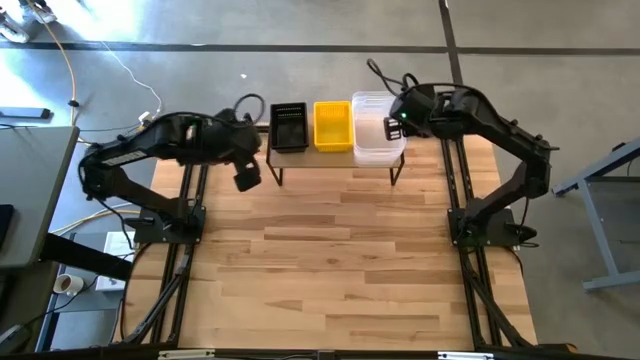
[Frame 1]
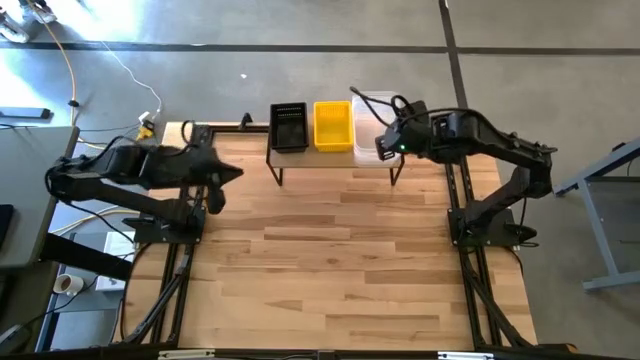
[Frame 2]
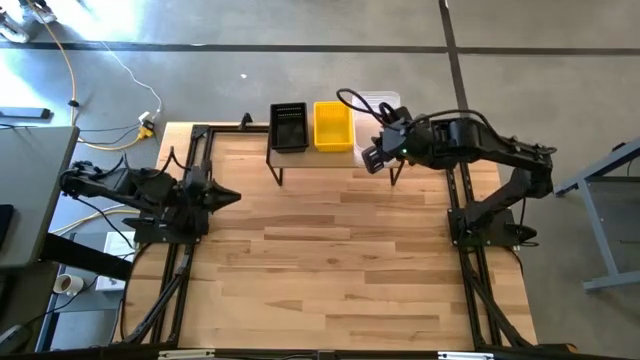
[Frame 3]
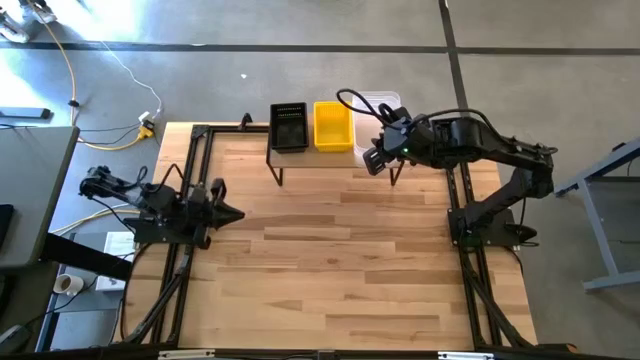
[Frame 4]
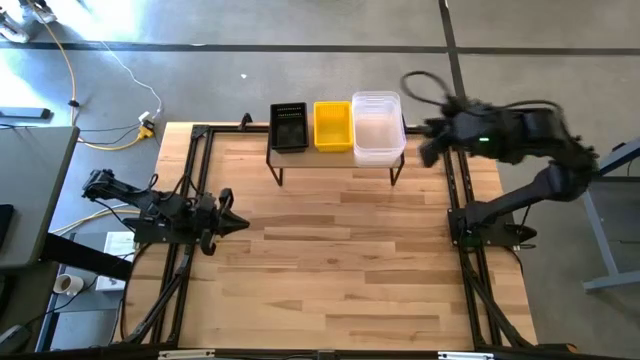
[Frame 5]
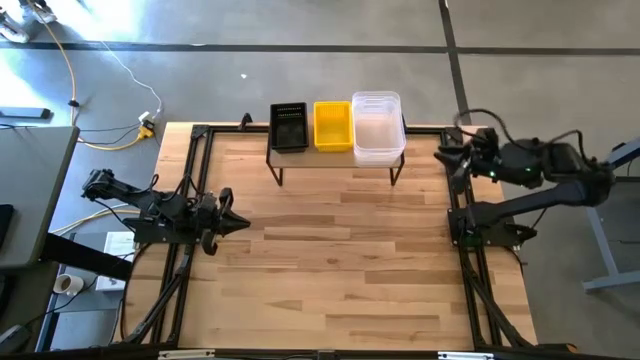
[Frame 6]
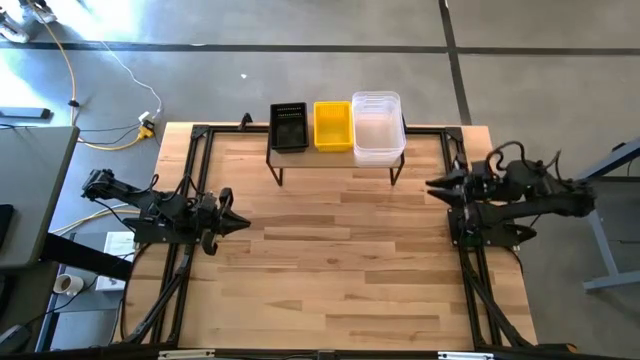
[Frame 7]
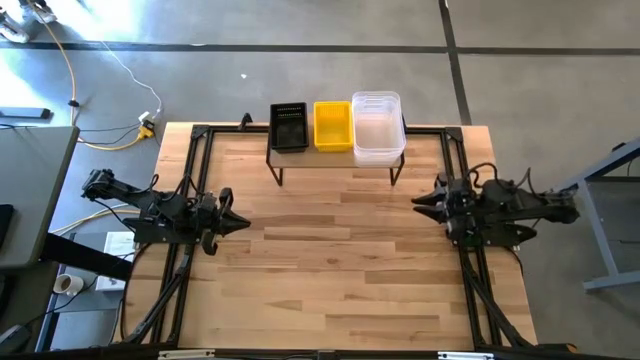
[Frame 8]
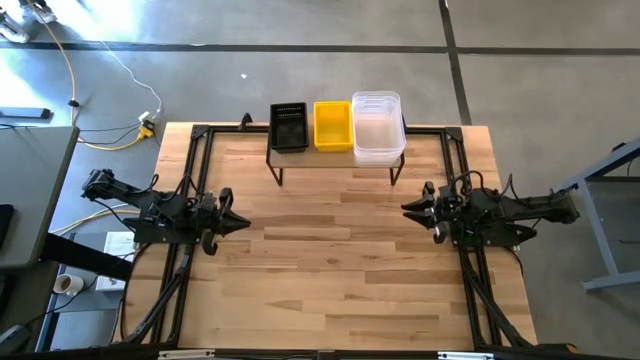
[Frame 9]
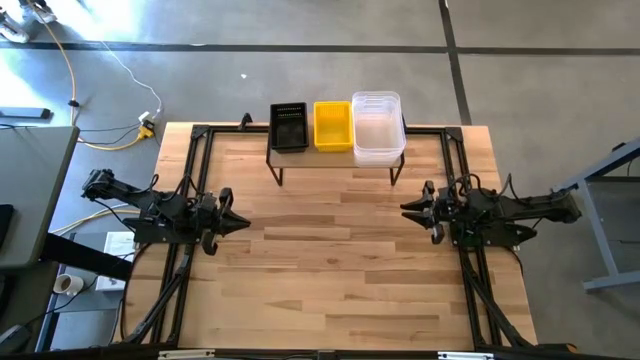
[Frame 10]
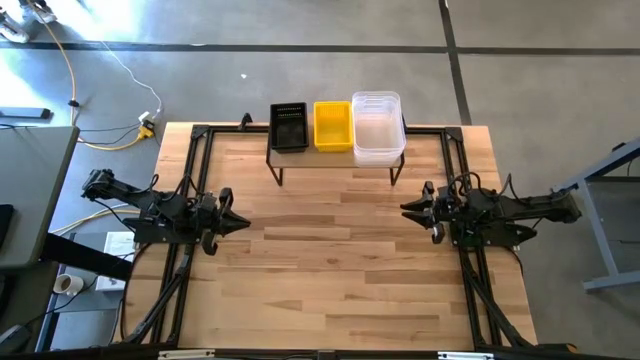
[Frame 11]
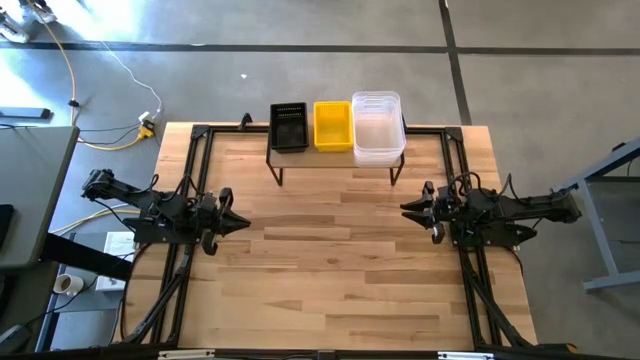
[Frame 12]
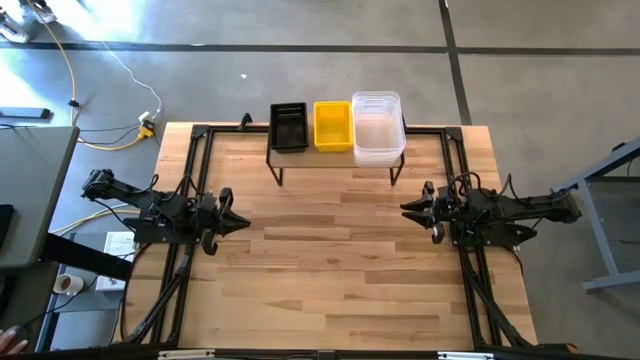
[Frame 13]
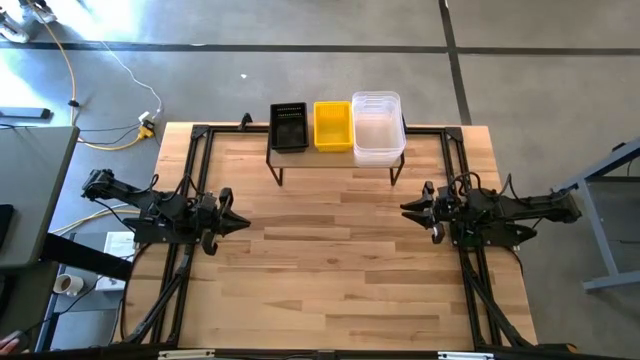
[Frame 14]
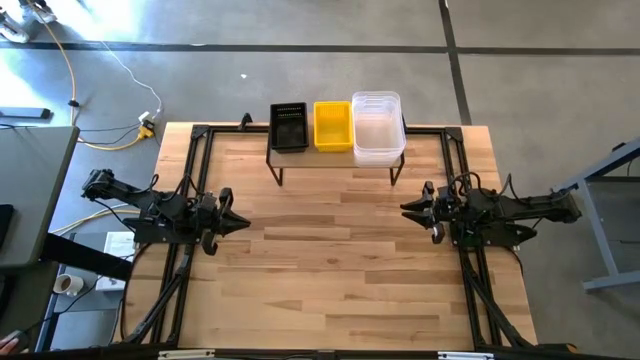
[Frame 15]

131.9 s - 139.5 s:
Task: Stack baskets on shelf by color
Return to Home Position

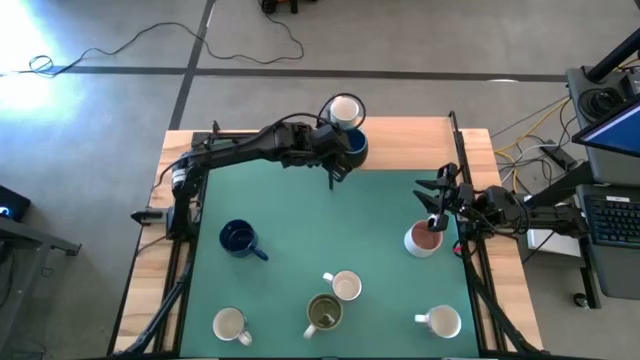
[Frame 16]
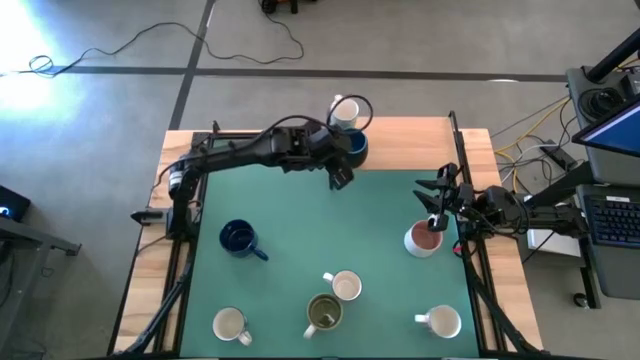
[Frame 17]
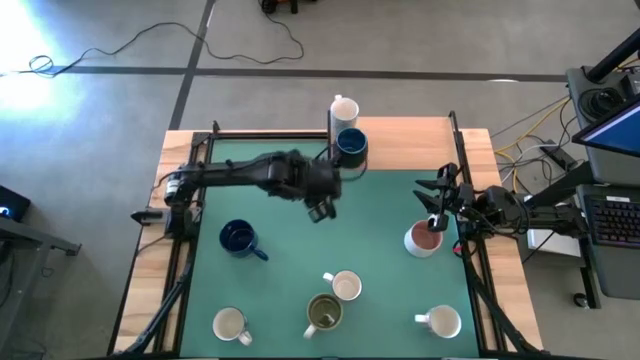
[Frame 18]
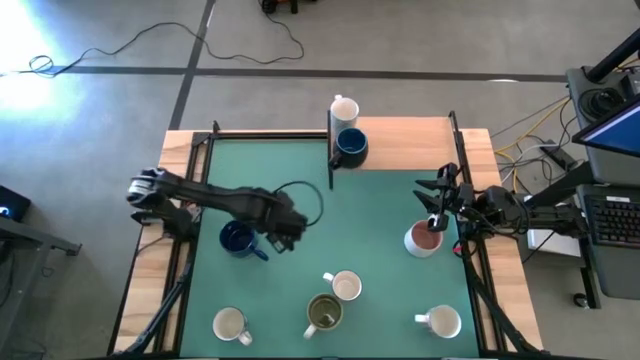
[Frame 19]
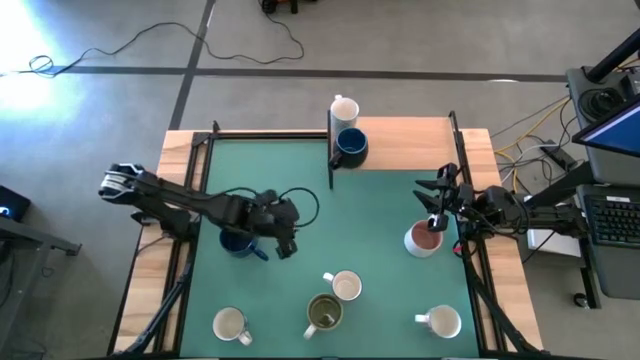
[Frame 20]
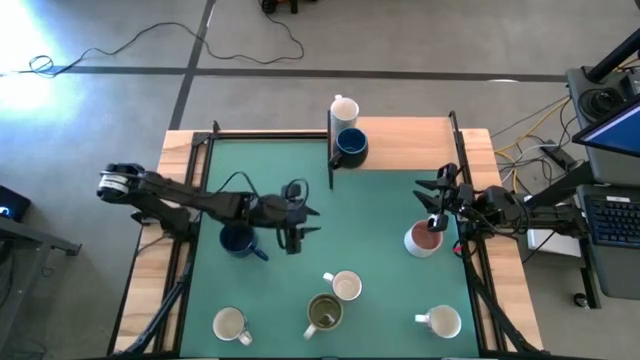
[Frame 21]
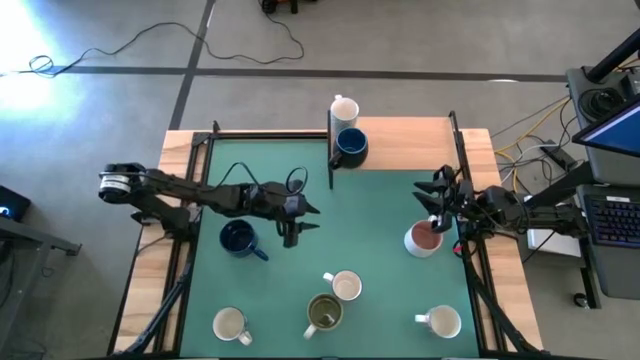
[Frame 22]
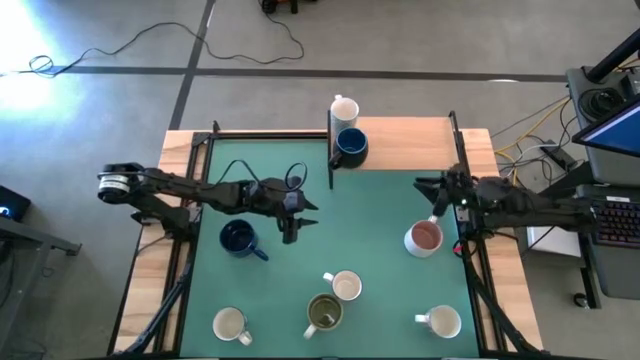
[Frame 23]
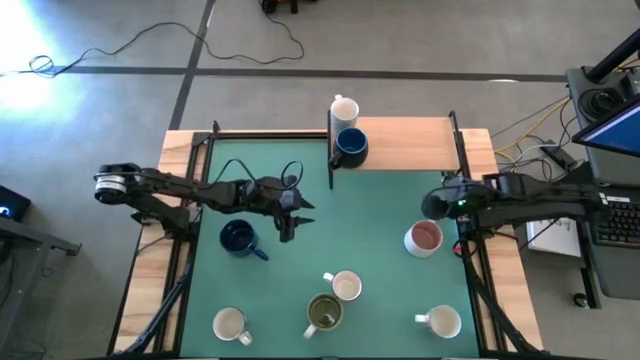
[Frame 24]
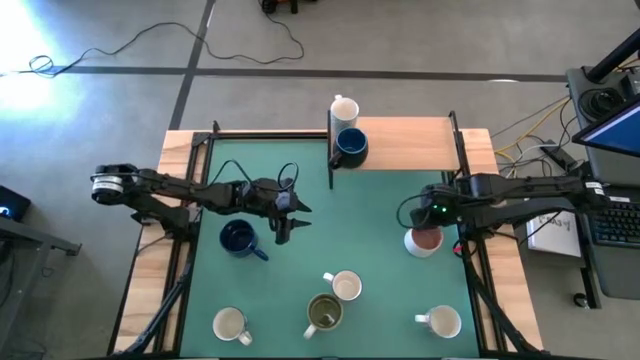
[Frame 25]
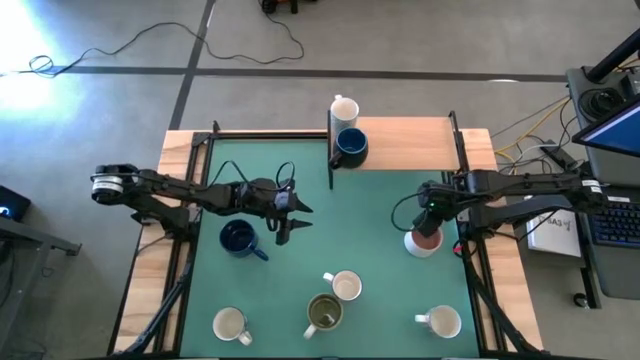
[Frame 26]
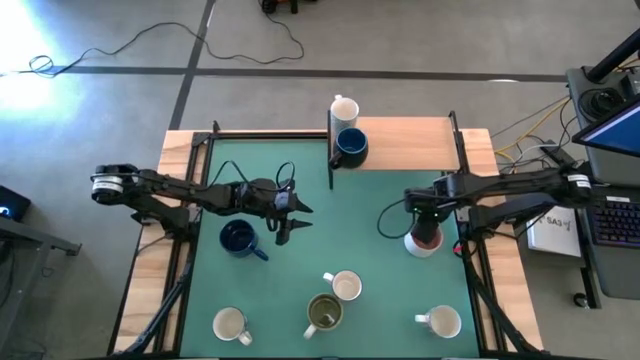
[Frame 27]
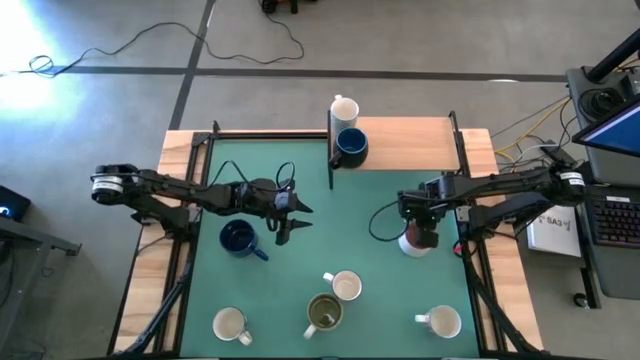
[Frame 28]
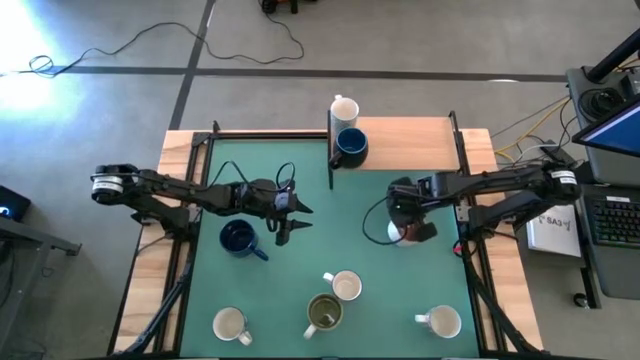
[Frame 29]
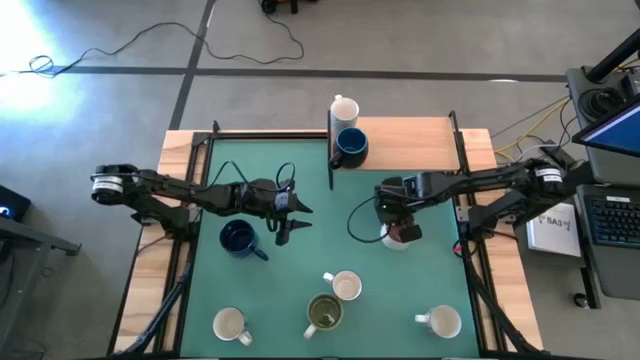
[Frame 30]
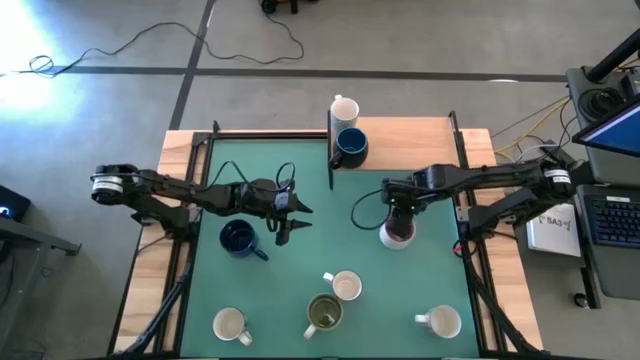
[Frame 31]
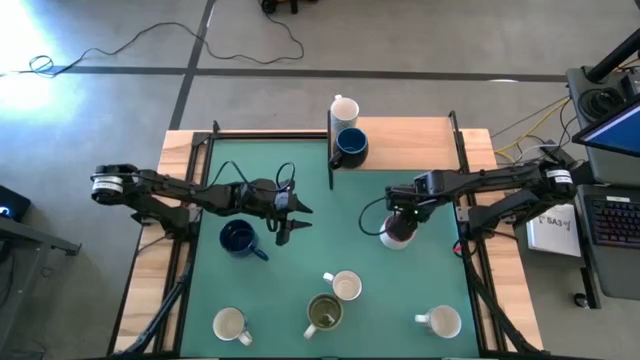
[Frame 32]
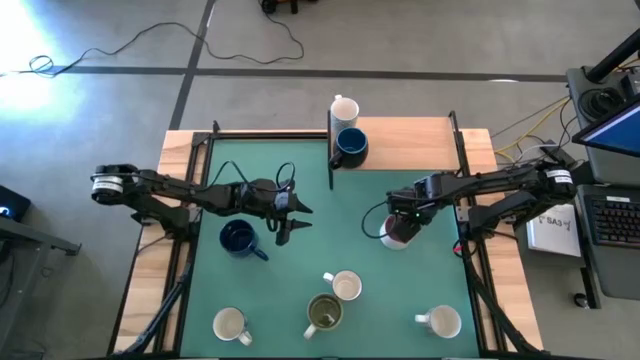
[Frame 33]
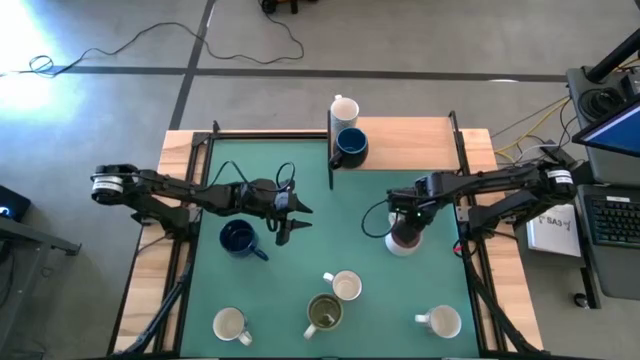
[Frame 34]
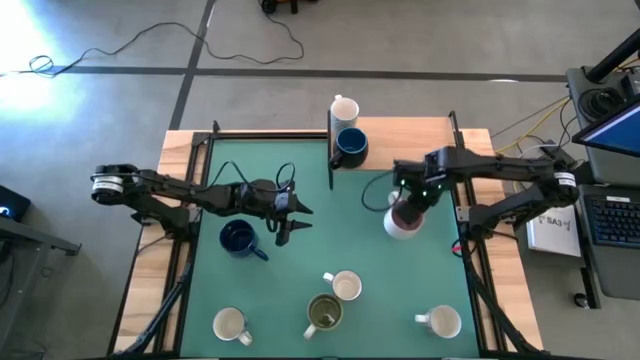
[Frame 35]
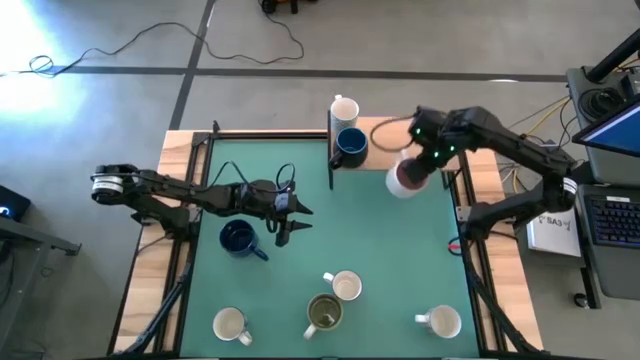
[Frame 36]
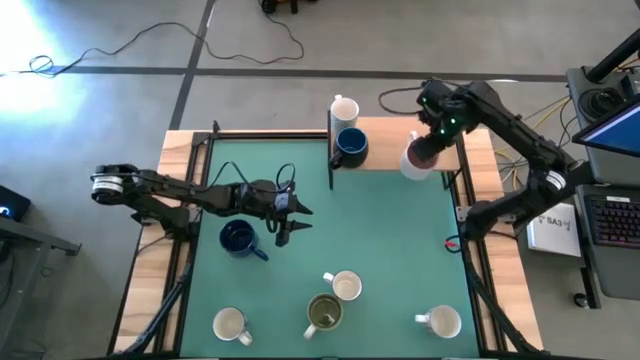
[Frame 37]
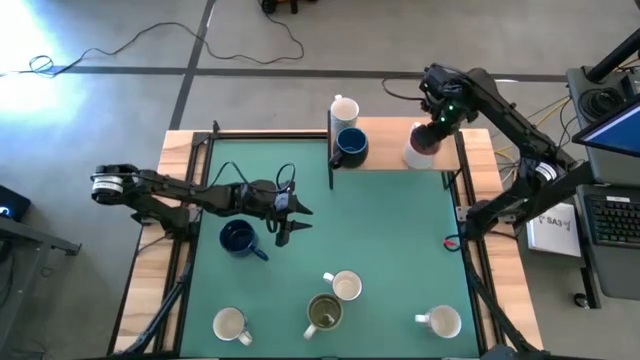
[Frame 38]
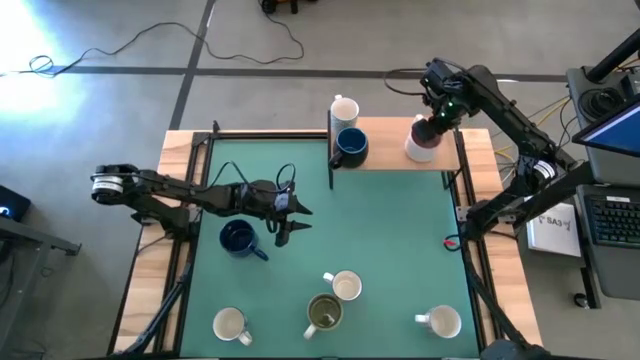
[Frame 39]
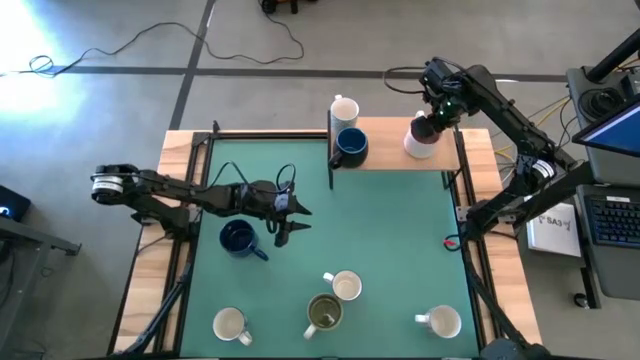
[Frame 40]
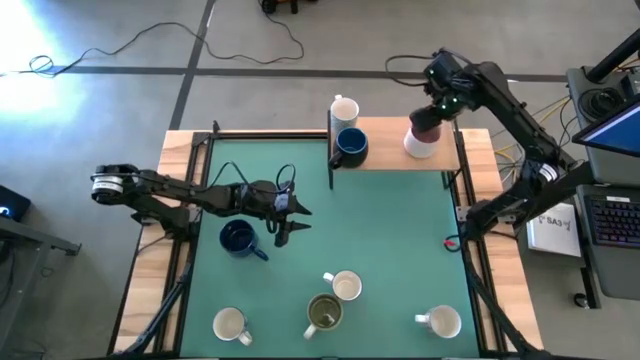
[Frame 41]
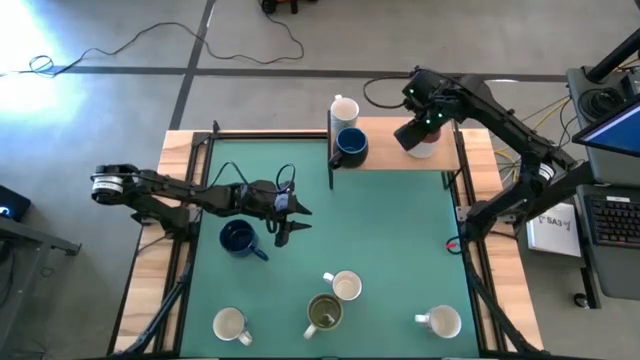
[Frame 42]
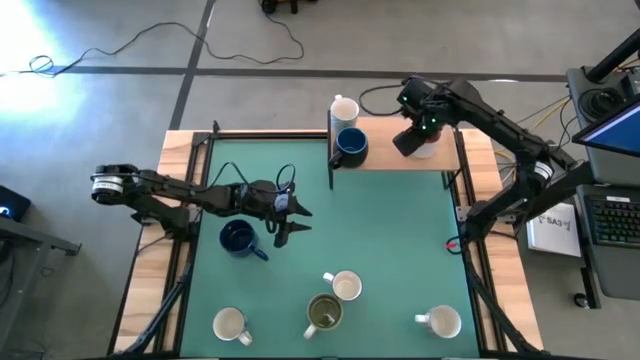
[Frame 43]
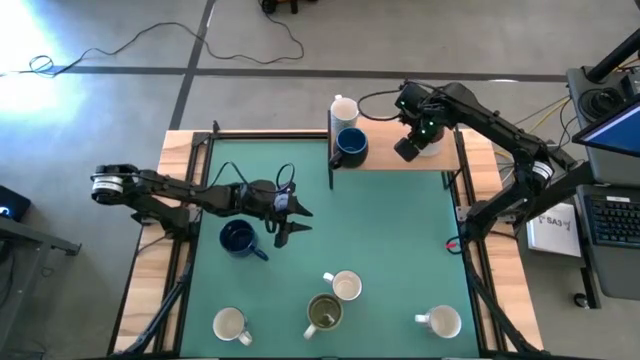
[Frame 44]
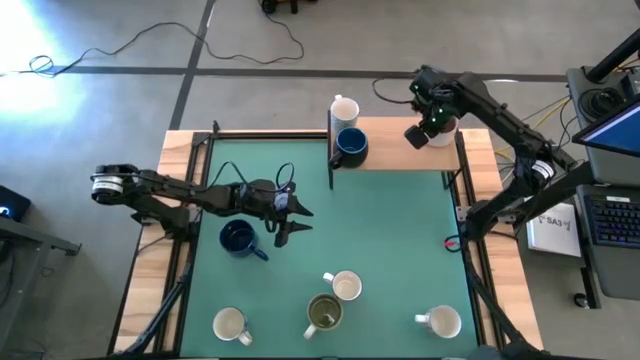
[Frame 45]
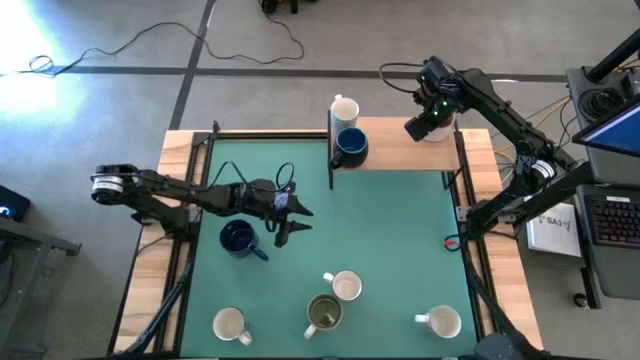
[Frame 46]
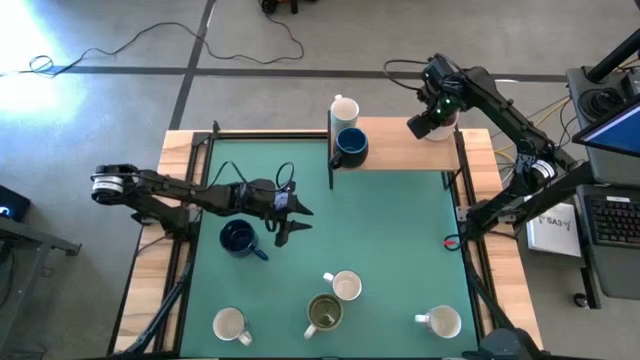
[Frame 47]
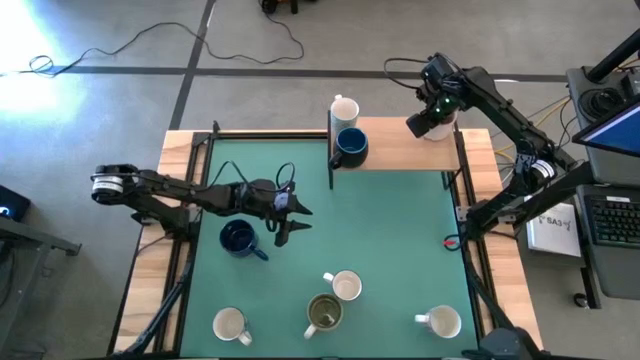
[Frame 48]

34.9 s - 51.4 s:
Task: Place coffee mugs
Put the top white mug on the shelf
